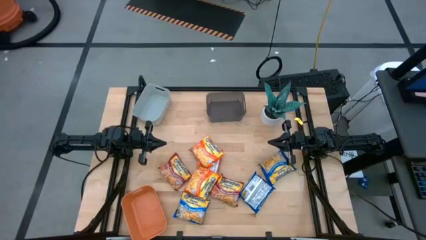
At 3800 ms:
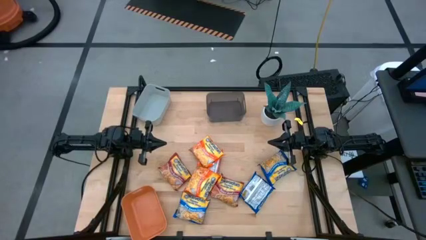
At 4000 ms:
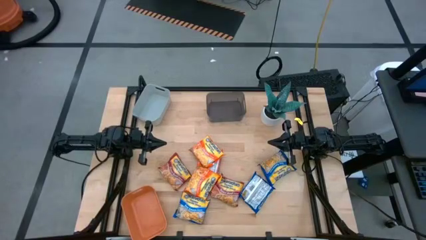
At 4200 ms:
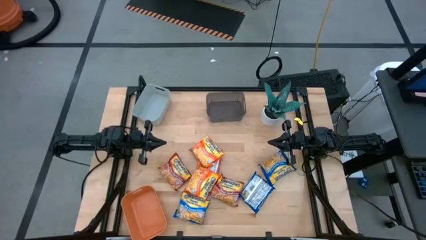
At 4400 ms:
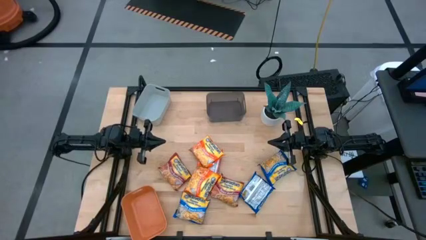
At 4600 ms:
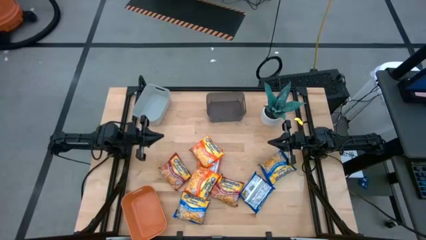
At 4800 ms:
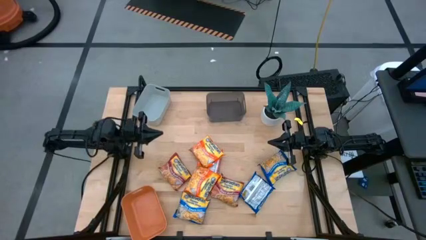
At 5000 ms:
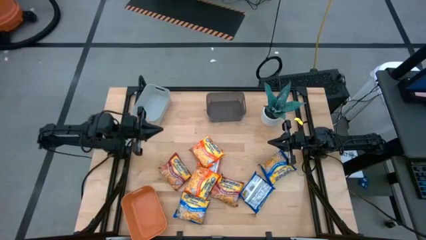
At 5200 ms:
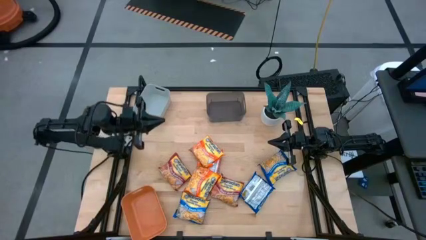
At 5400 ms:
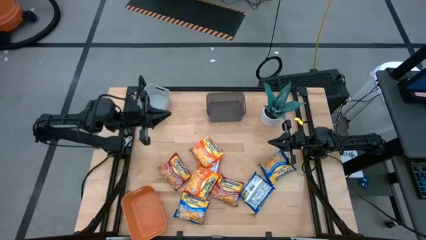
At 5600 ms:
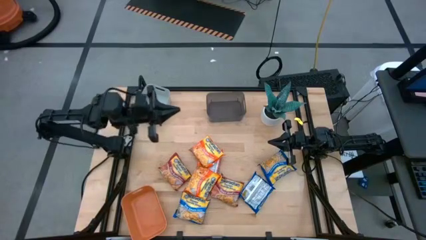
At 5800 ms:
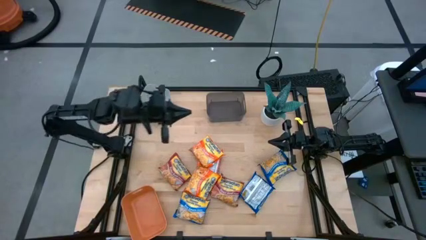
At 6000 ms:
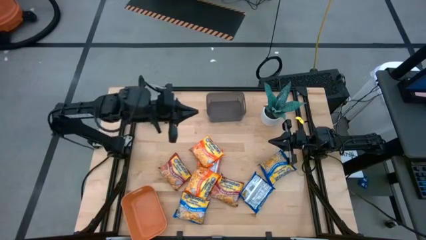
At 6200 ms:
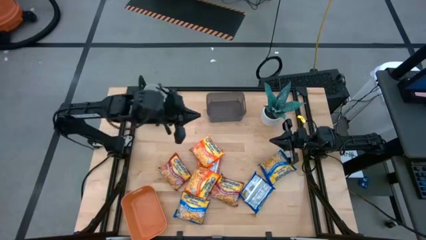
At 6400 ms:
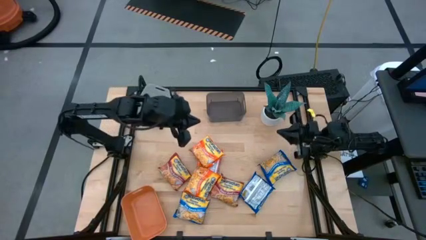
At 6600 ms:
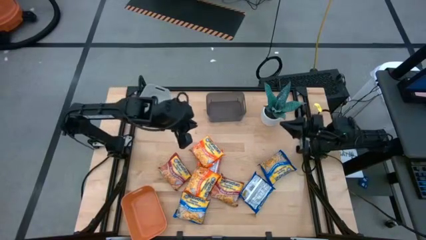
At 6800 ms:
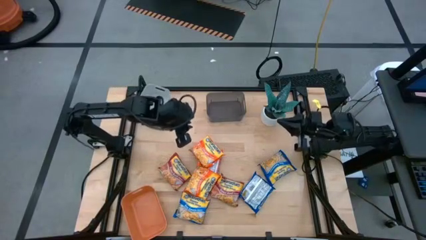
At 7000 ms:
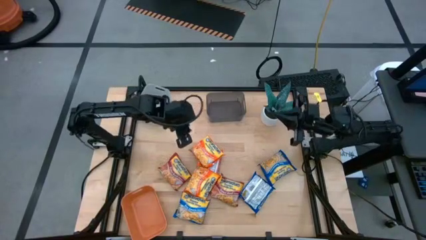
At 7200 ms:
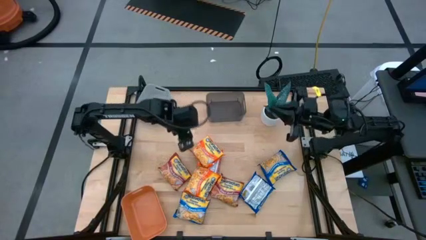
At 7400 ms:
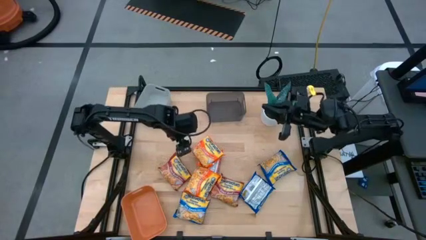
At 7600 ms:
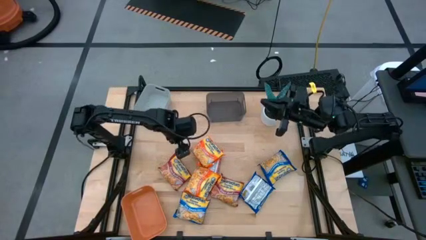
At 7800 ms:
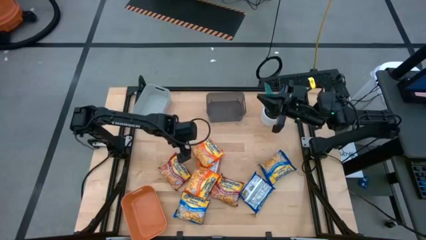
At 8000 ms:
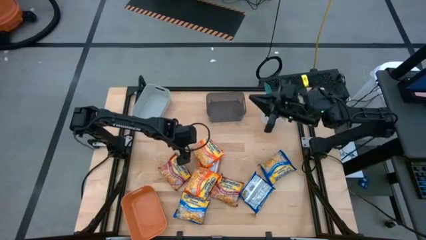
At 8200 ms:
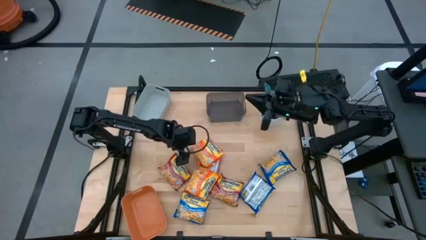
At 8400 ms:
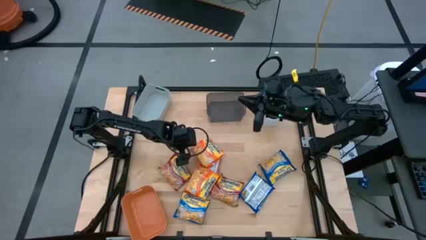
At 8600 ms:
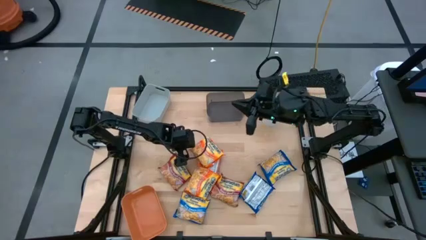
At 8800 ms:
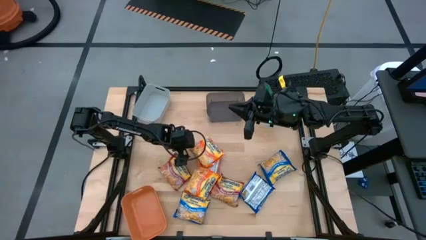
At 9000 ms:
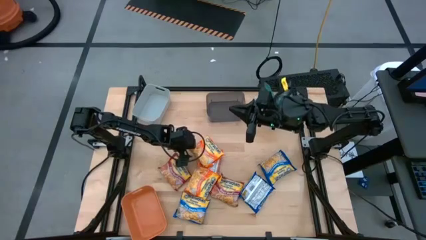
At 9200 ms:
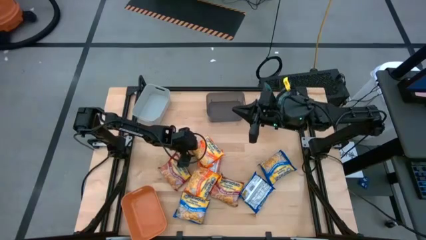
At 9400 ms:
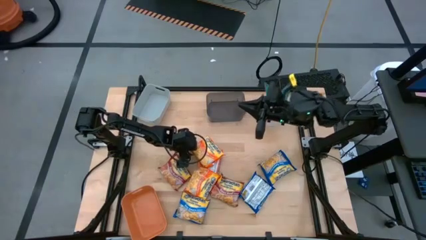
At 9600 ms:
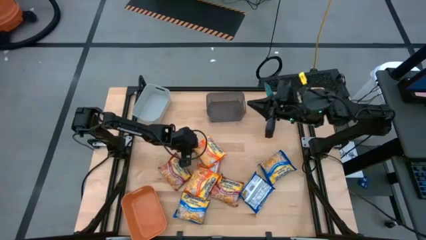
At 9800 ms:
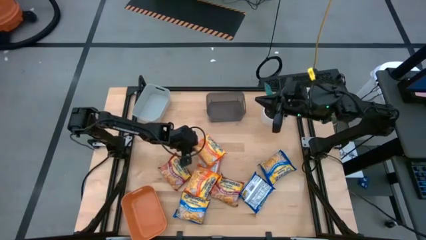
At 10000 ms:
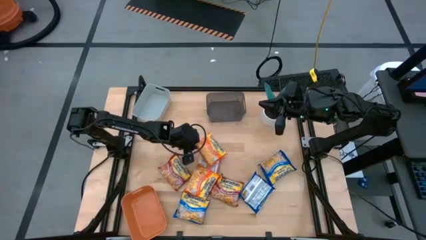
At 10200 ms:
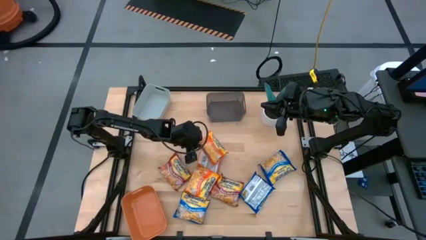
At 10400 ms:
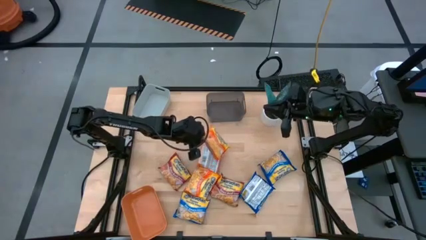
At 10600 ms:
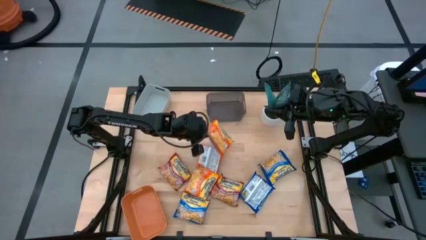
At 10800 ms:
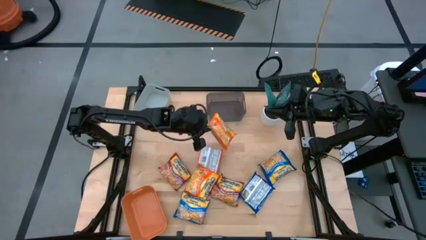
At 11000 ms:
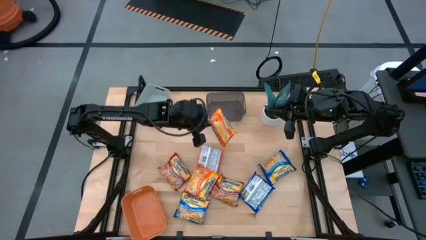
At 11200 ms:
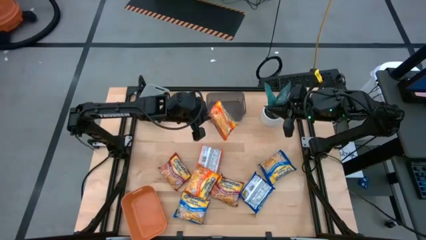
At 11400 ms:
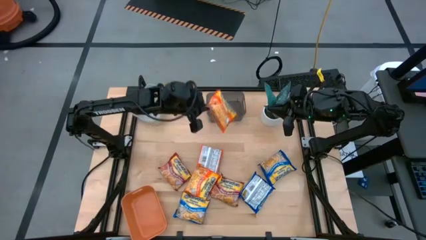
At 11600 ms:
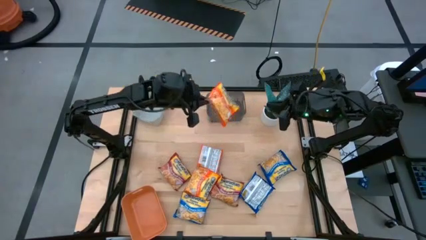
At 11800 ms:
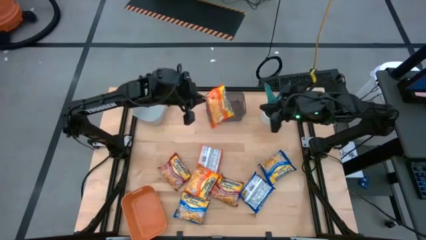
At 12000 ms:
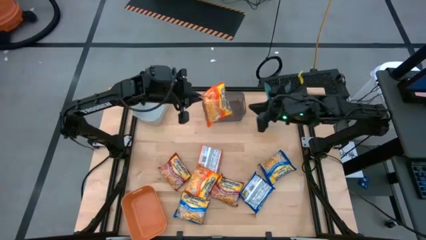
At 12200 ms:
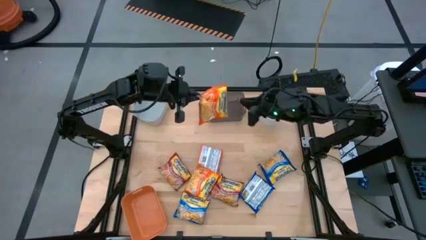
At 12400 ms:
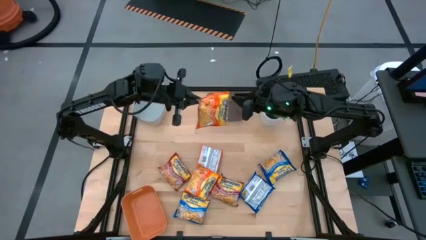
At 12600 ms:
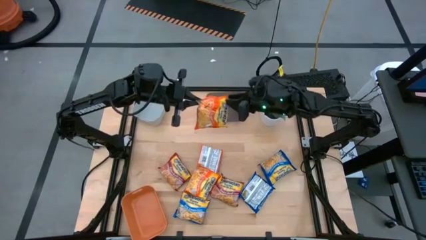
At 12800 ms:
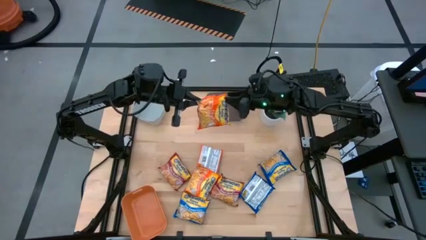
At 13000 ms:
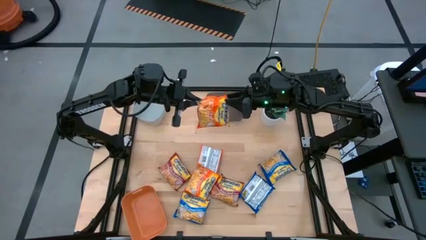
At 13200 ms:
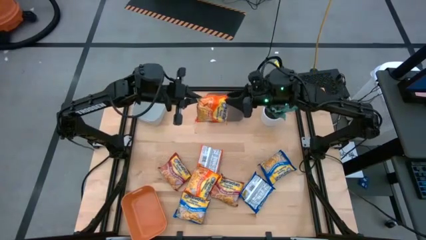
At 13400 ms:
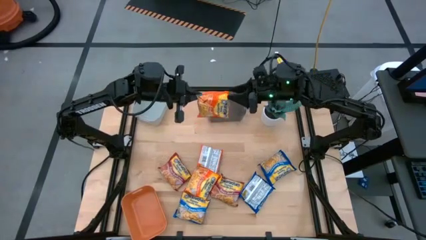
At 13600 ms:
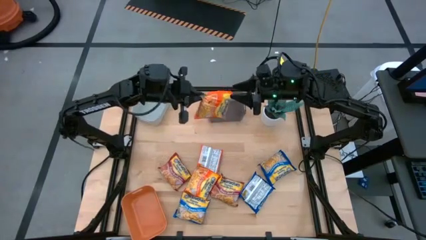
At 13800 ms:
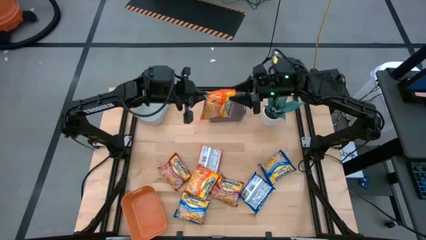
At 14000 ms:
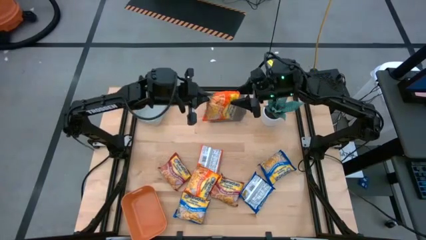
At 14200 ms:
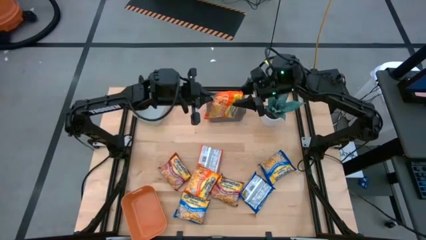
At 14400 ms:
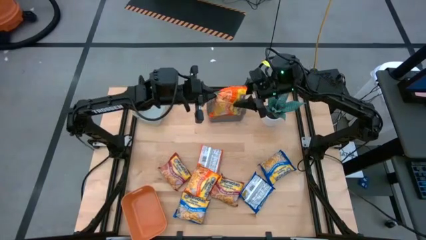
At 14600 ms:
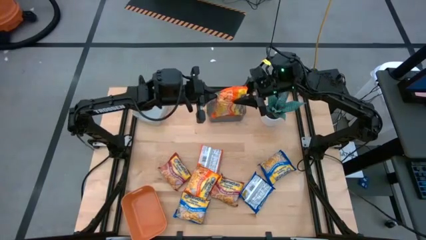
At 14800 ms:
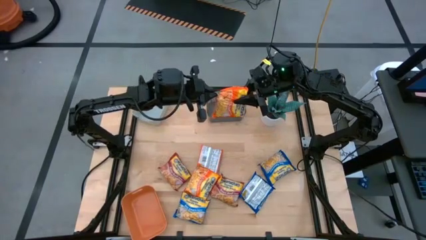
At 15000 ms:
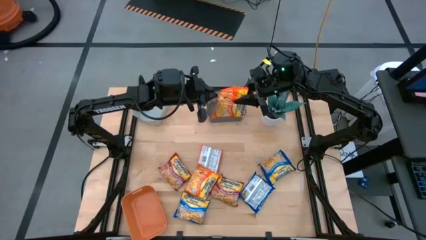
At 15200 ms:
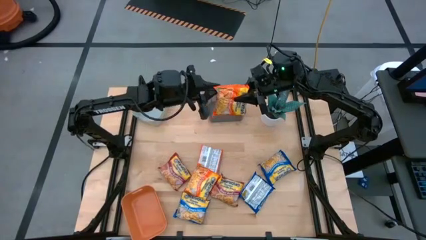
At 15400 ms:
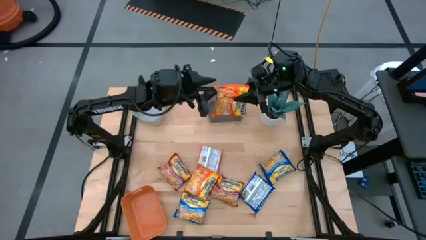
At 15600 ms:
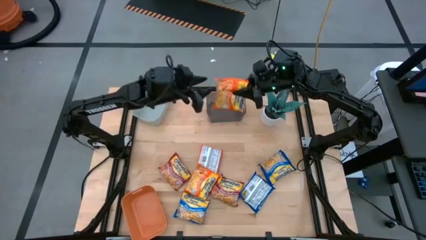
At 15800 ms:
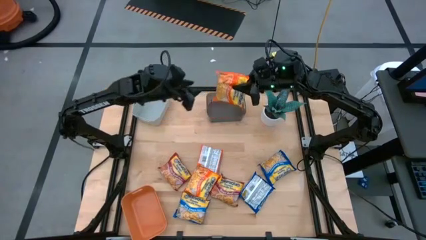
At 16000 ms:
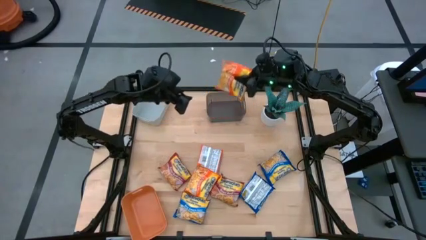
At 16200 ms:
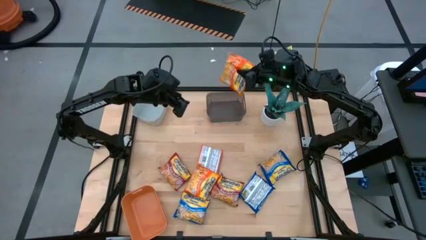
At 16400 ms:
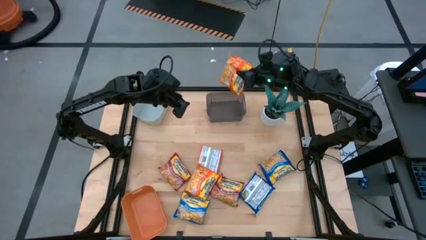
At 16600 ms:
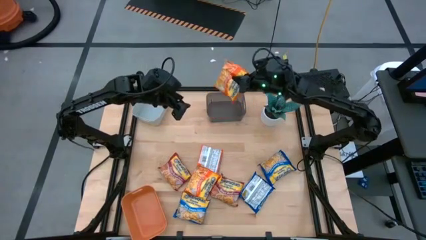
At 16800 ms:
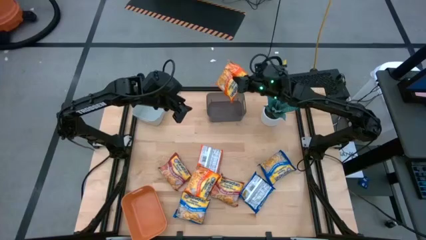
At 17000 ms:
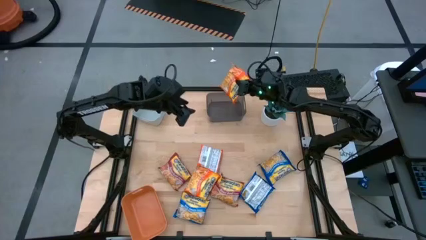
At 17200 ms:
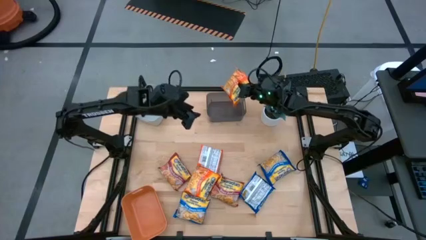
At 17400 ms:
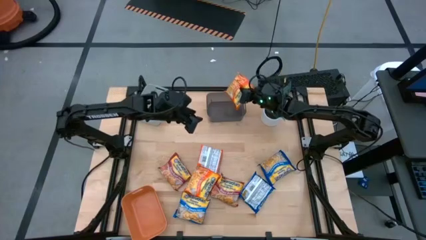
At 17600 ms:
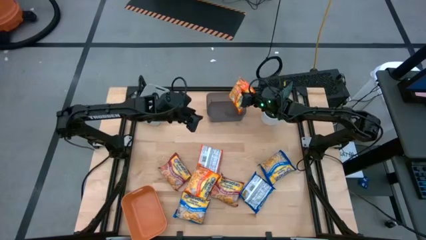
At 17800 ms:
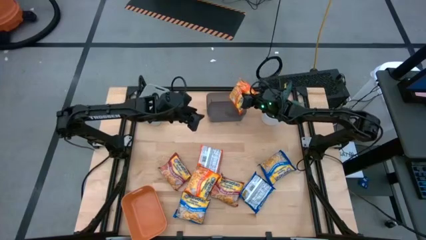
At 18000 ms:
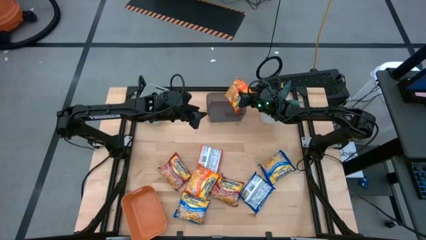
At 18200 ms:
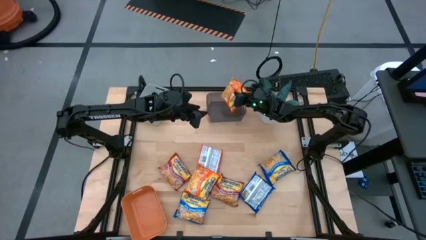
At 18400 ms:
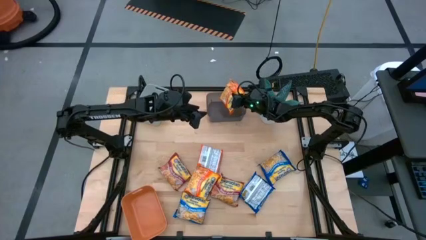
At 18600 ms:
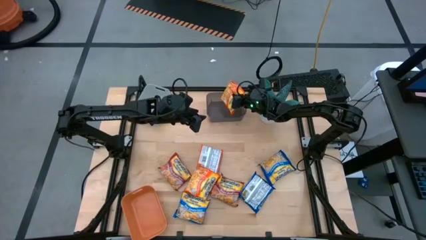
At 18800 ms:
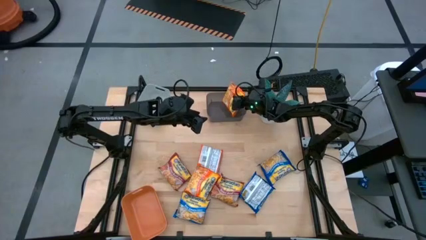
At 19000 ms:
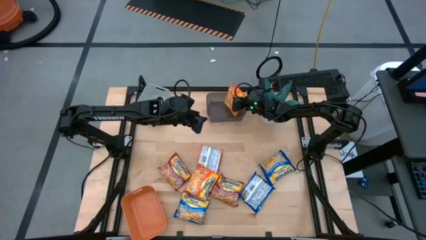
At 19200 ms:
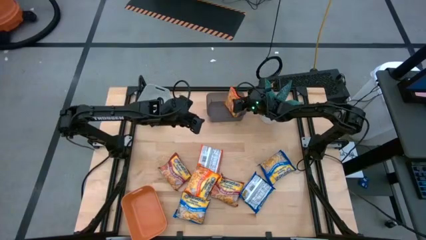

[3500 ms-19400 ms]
Task: Sort Maruchan noodles
Put the top orange noodle pack into the black bin
